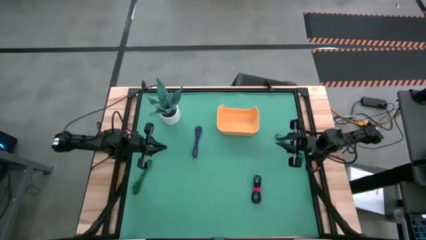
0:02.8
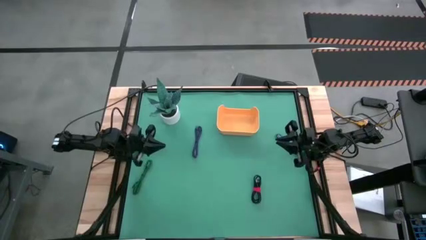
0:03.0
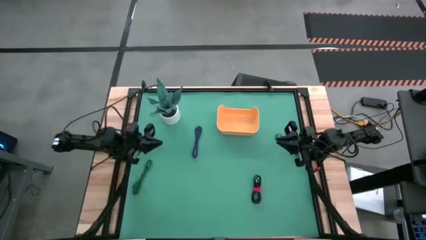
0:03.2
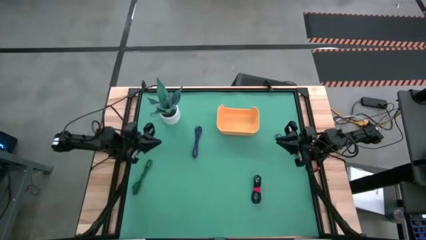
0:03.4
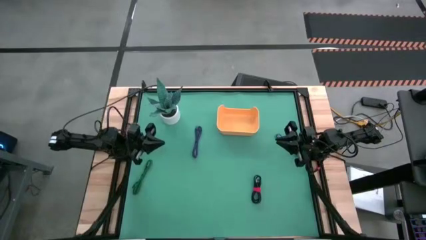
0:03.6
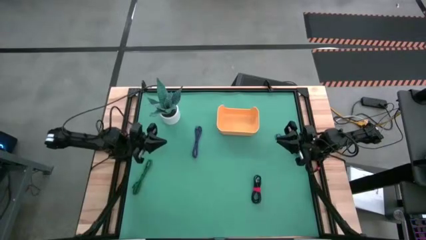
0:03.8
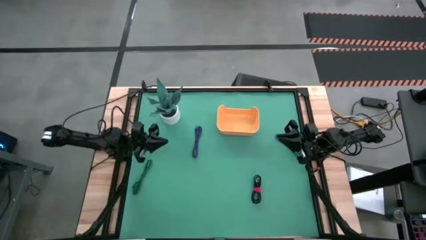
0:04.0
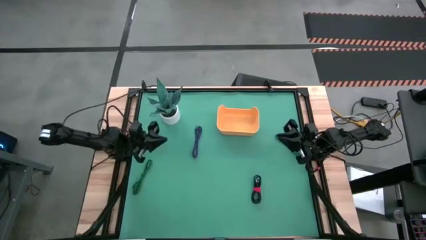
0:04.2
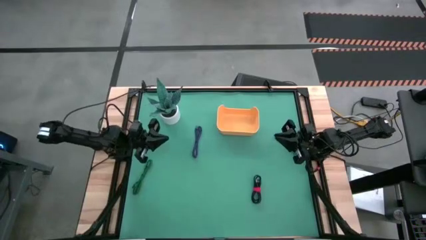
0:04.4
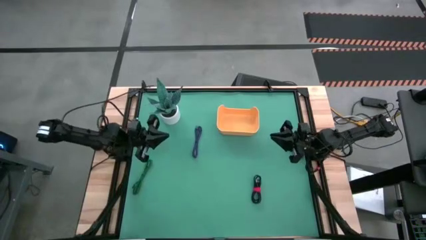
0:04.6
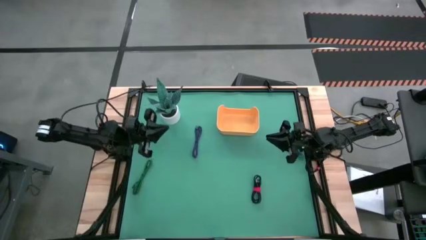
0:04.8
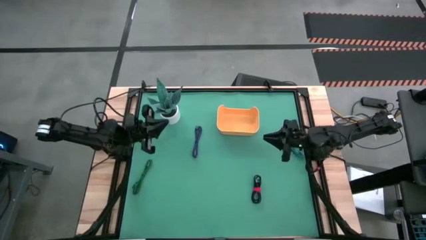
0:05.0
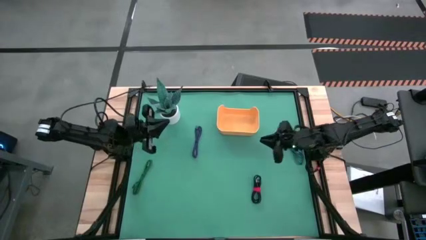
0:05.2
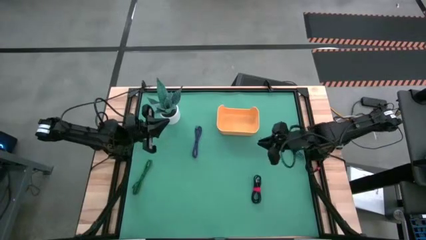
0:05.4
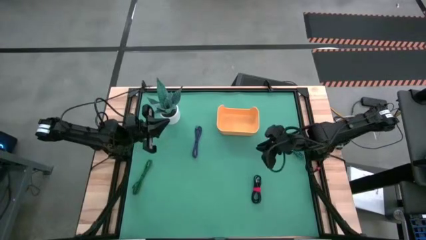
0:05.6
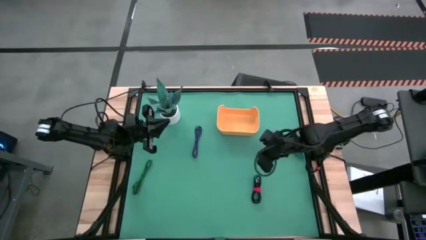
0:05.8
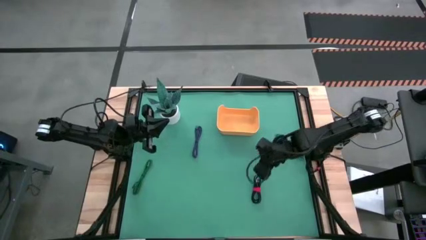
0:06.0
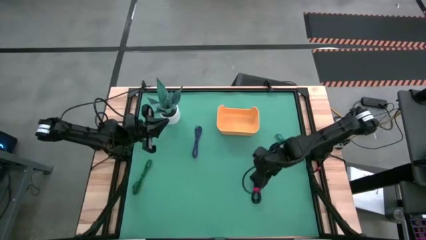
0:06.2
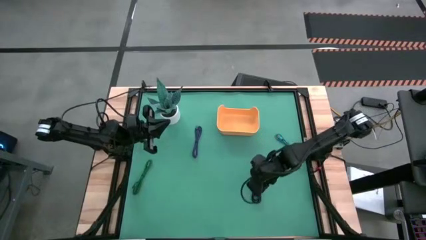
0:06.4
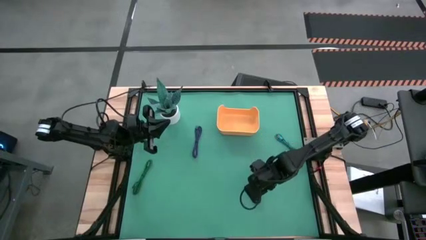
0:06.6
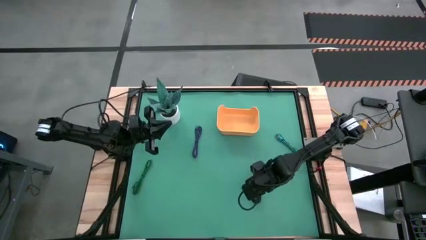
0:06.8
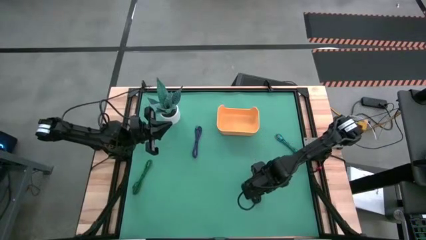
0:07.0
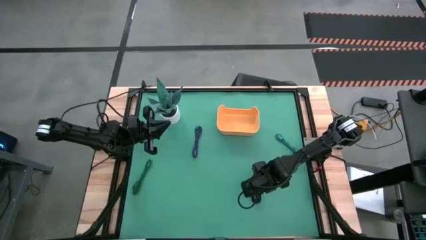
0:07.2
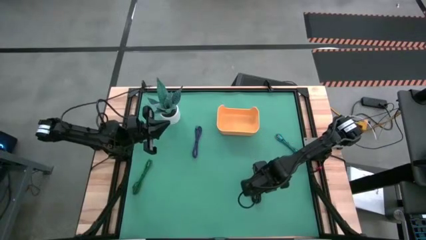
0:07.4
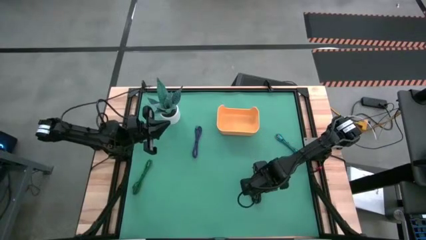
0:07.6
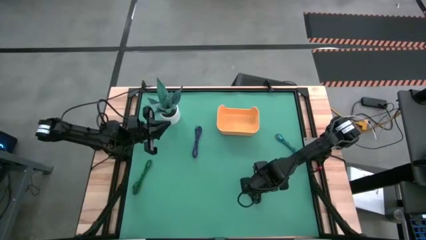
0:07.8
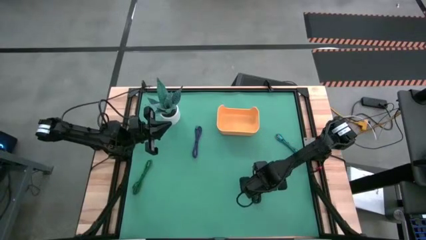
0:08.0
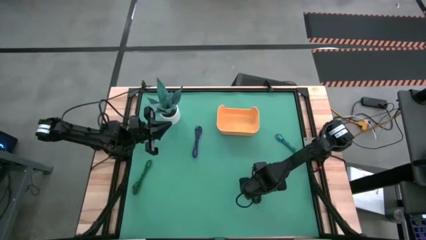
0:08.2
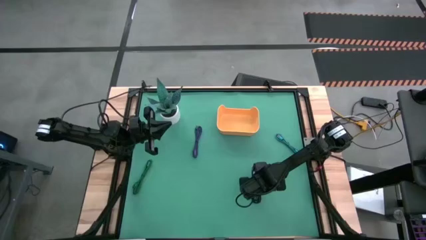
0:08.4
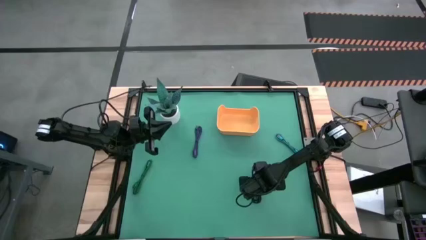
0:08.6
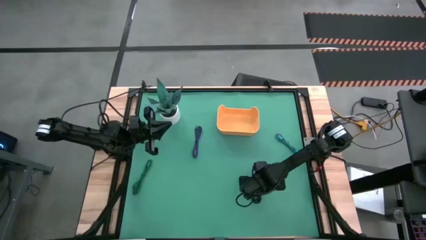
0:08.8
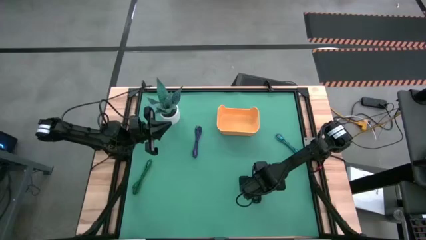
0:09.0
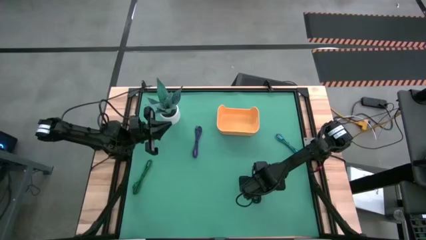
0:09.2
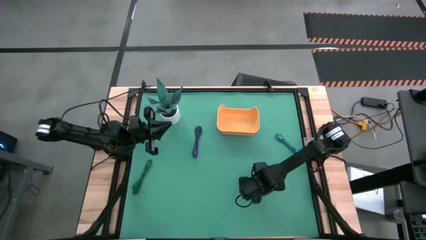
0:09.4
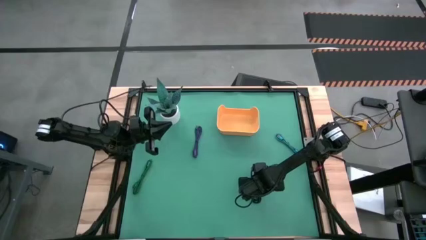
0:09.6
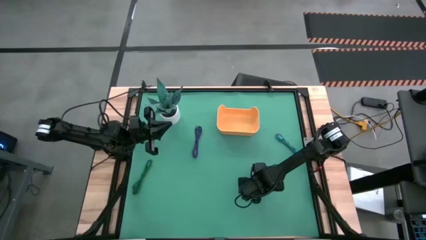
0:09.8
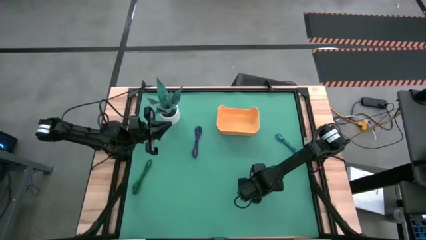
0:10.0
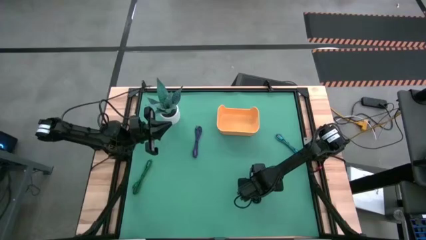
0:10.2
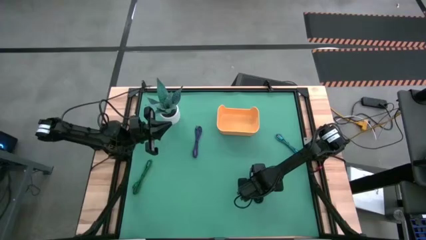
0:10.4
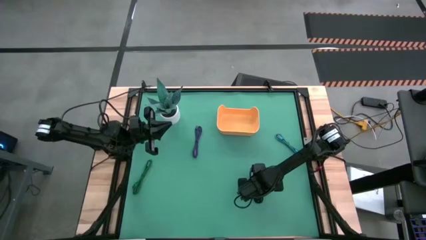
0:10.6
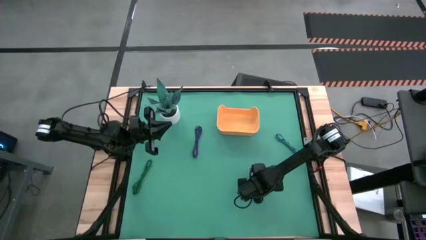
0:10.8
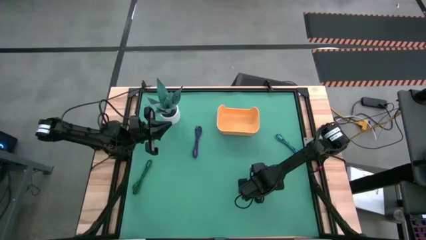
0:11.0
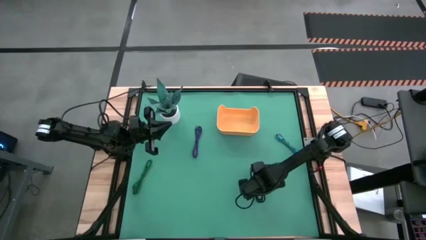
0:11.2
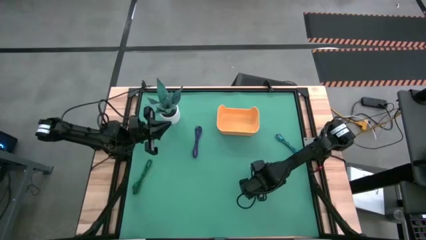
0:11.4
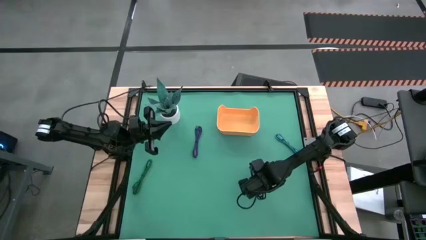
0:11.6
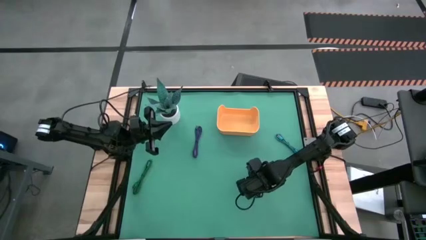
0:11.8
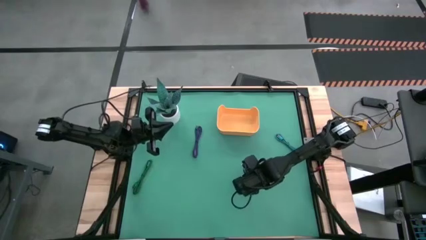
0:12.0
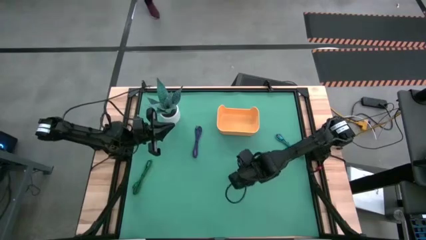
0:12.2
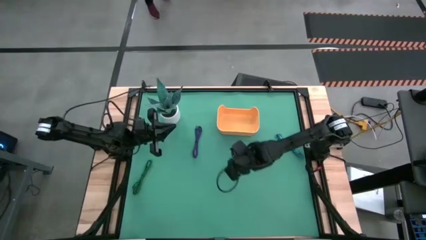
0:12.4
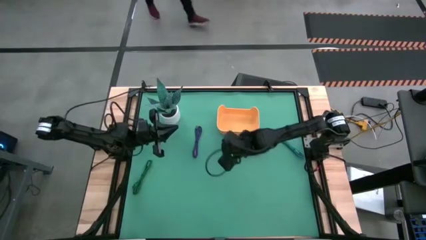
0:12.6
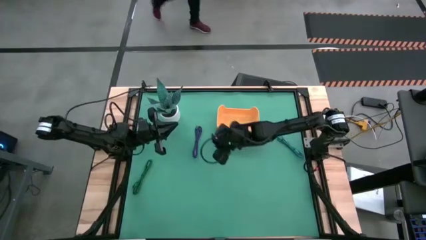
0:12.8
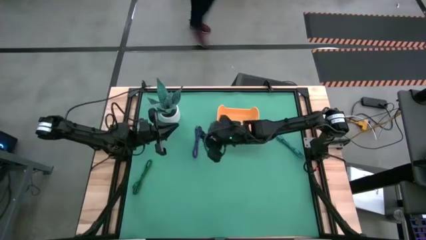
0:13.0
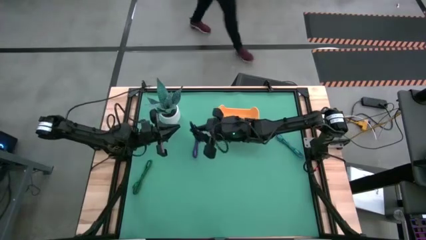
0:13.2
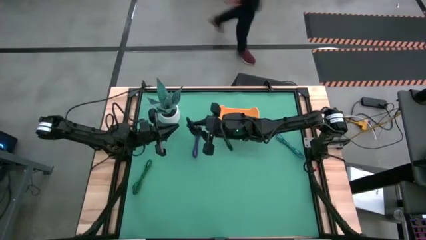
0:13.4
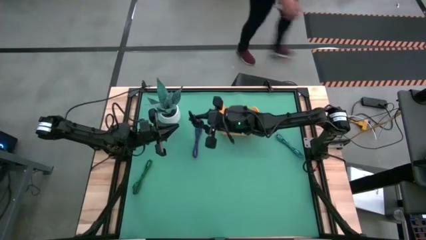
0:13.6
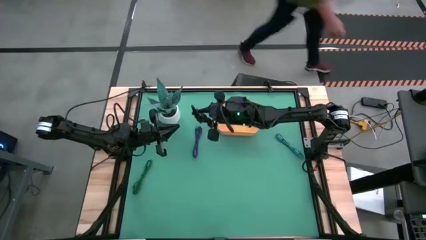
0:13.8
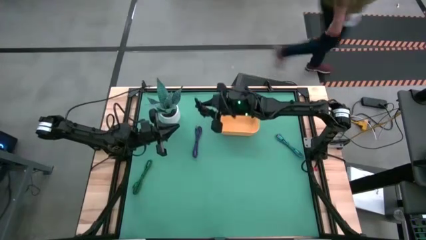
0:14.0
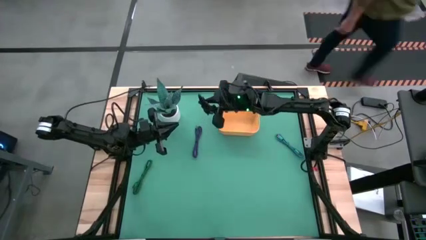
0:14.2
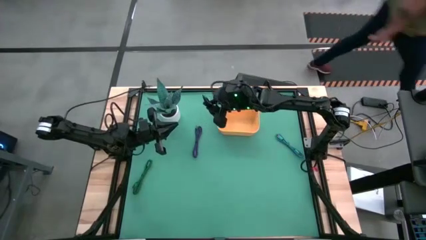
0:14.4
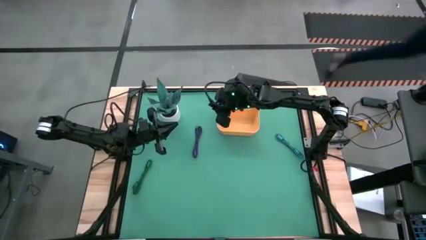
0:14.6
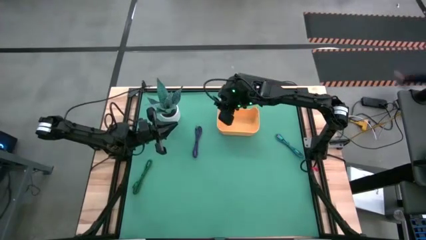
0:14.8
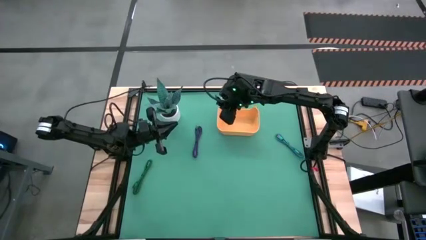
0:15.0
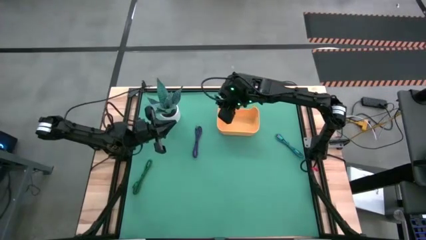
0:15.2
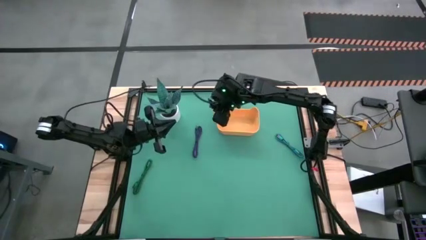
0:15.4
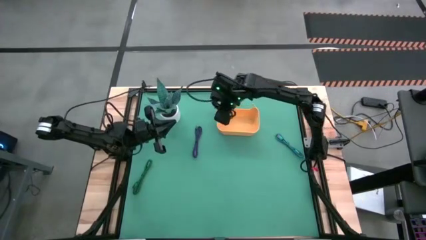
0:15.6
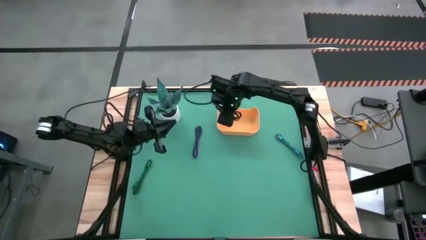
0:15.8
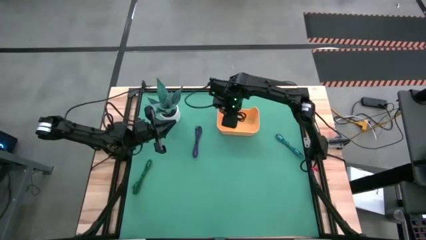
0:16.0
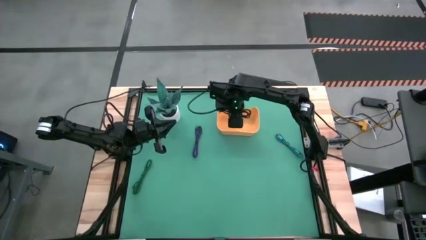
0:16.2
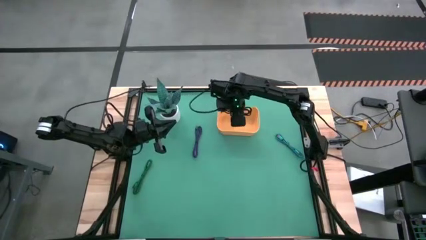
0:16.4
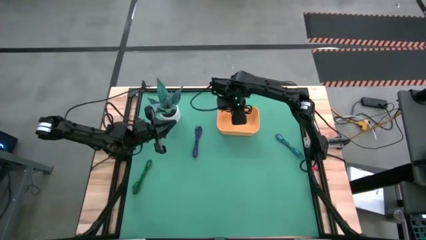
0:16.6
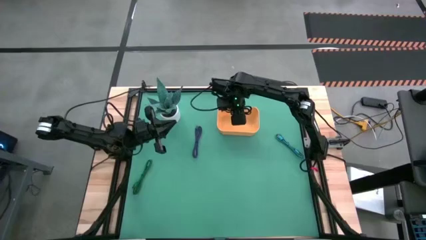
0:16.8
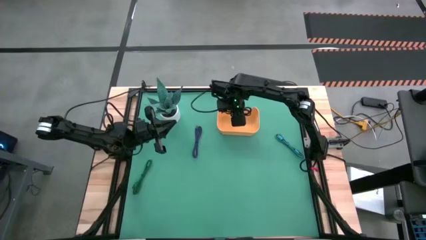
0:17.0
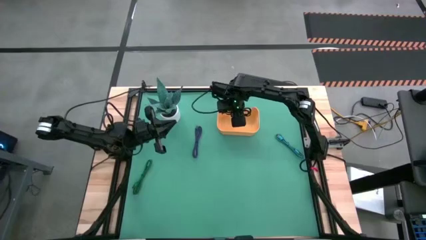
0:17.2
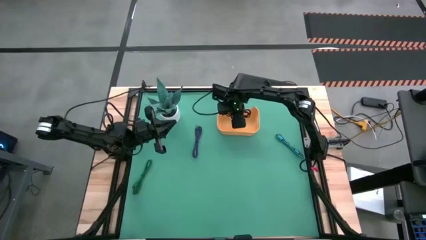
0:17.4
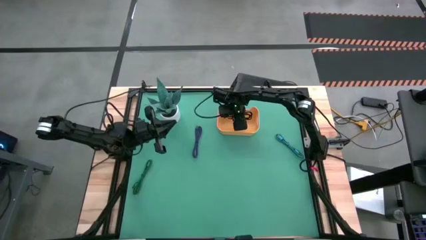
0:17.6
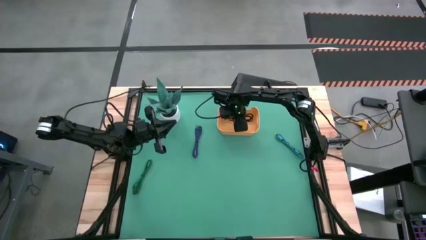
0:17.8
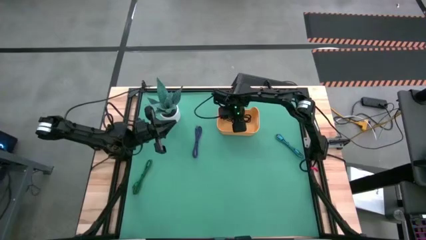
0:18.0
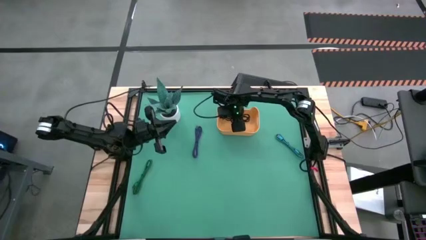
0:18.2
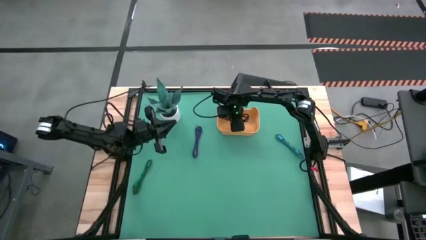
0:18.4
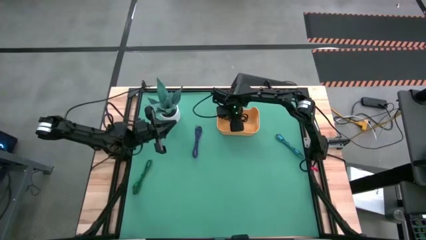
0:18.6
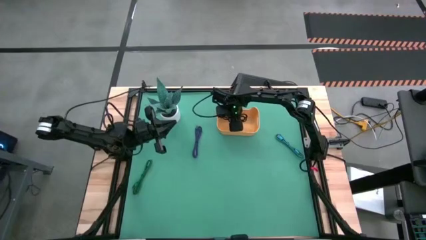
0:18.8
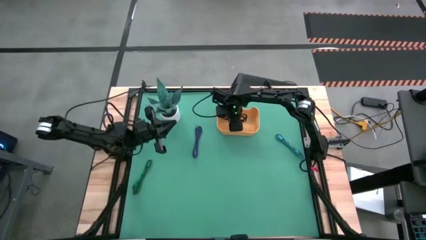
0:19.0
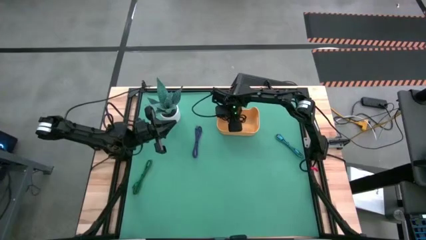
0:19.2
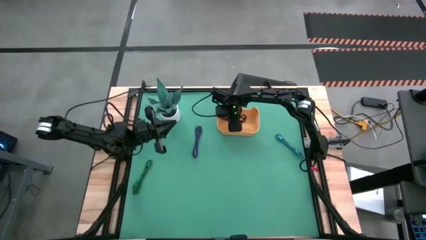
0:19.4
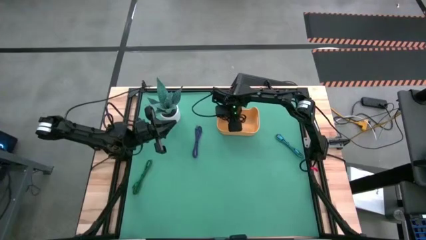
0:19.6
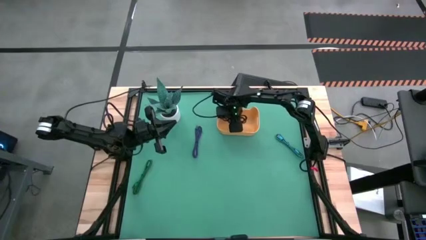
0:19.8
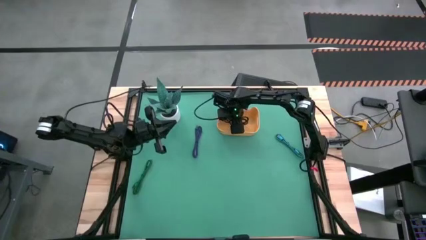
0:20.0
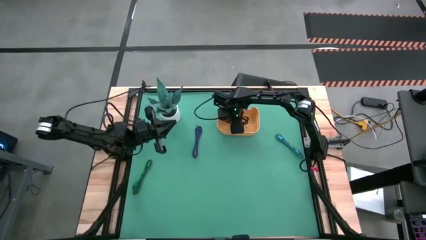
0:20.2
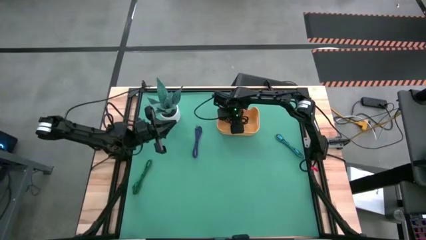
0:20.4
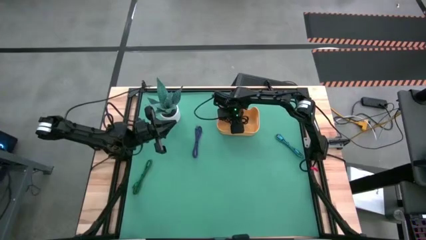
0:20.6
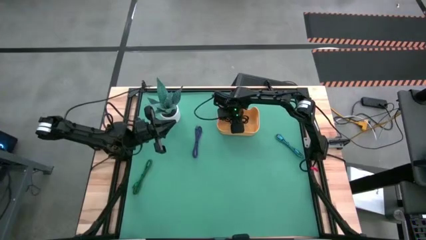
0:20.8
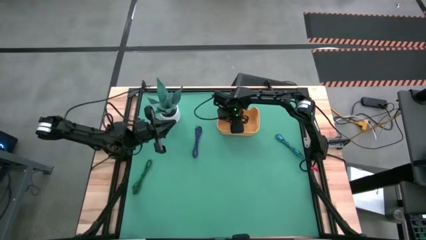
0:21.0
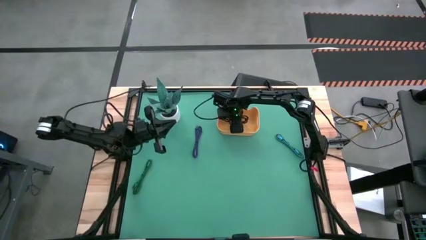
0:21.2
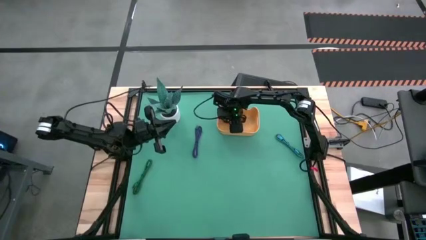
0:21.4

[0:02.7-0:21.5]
Task: Pick and place USB-C Cables
Put the black charger cable into the yellow bin
